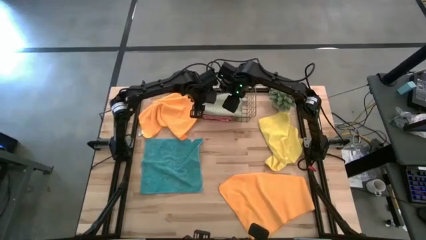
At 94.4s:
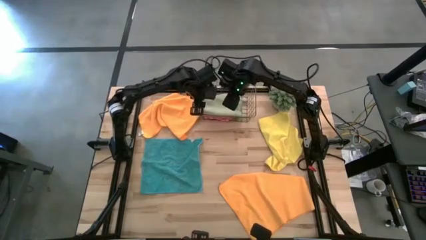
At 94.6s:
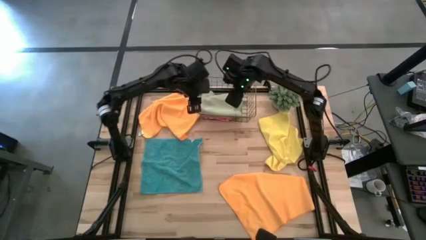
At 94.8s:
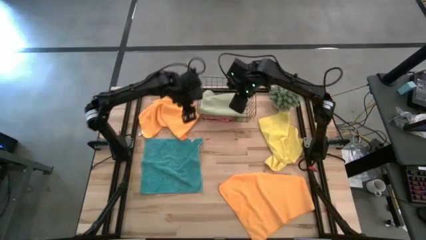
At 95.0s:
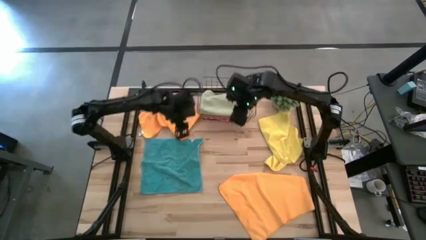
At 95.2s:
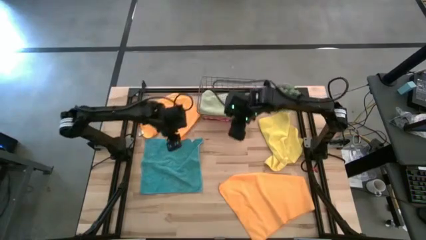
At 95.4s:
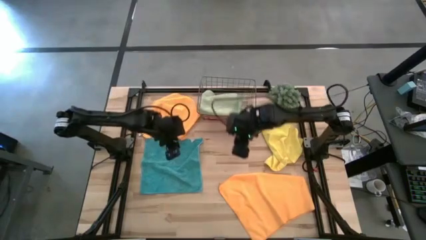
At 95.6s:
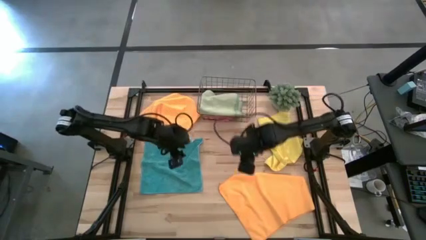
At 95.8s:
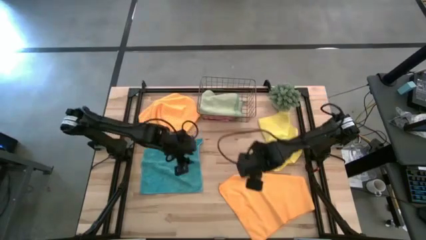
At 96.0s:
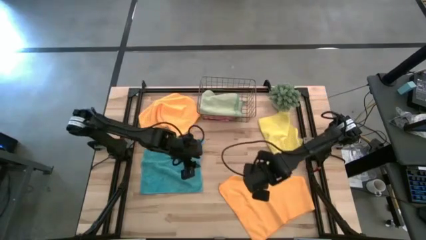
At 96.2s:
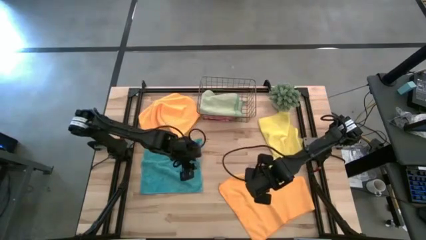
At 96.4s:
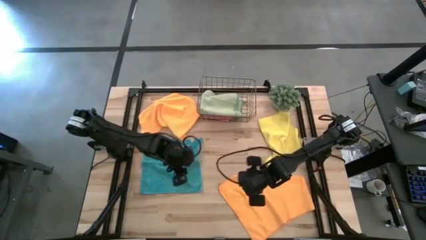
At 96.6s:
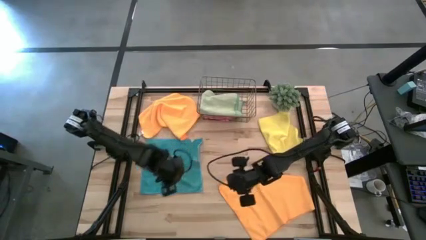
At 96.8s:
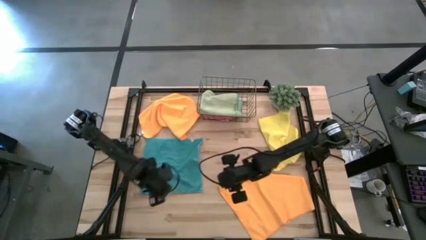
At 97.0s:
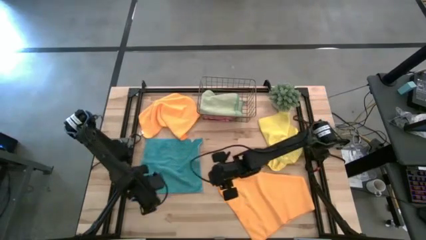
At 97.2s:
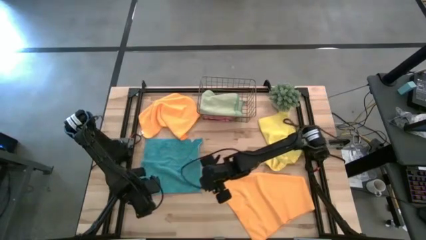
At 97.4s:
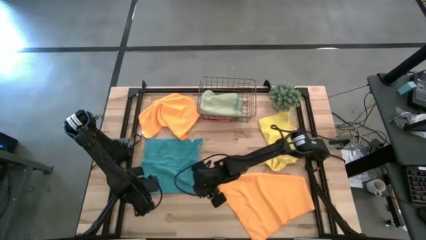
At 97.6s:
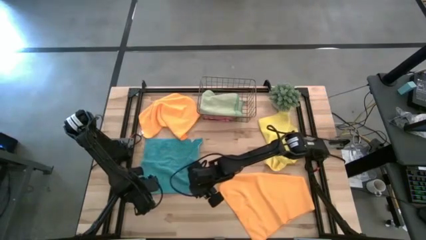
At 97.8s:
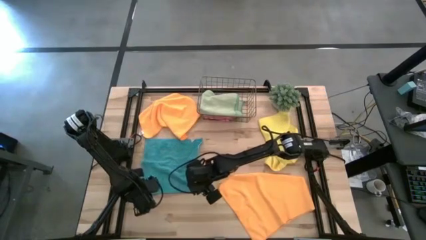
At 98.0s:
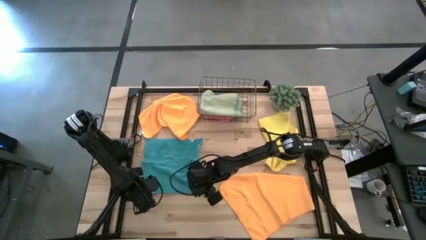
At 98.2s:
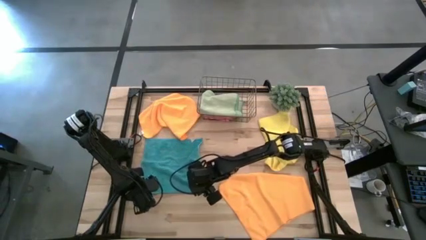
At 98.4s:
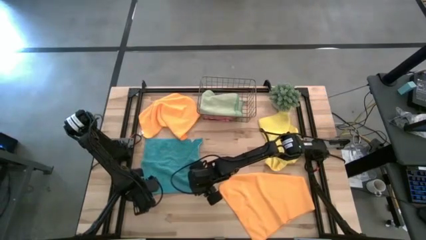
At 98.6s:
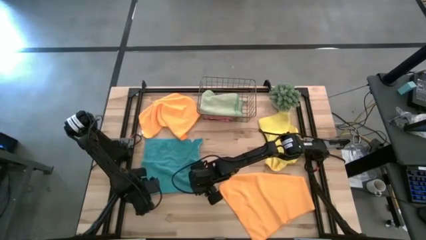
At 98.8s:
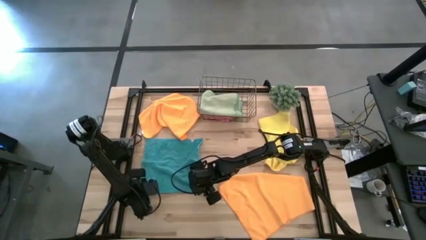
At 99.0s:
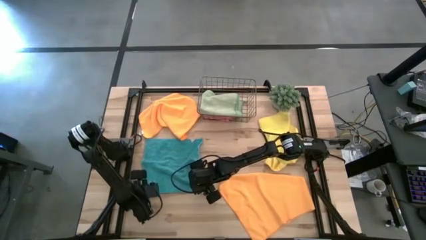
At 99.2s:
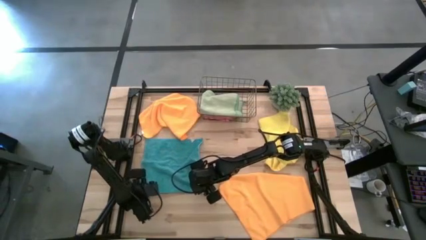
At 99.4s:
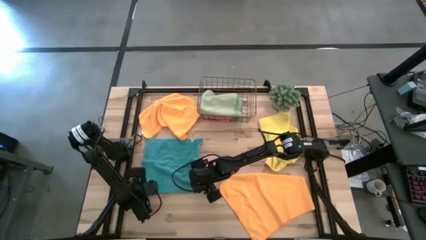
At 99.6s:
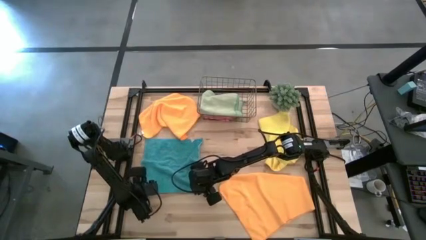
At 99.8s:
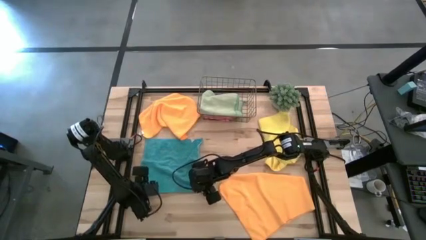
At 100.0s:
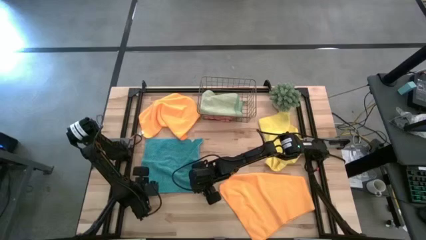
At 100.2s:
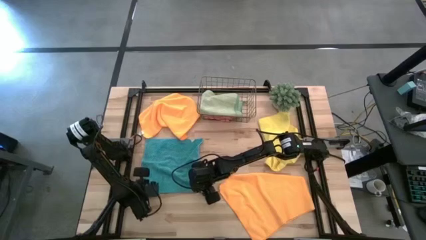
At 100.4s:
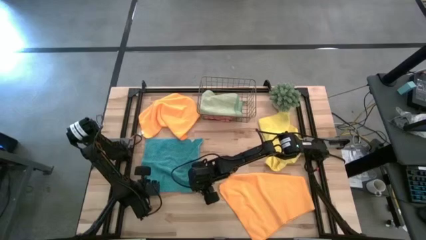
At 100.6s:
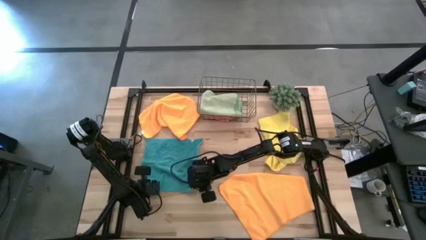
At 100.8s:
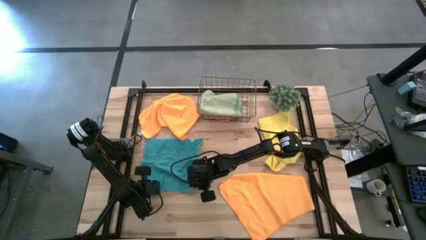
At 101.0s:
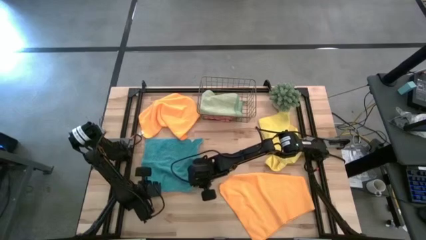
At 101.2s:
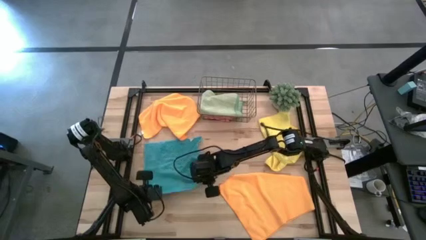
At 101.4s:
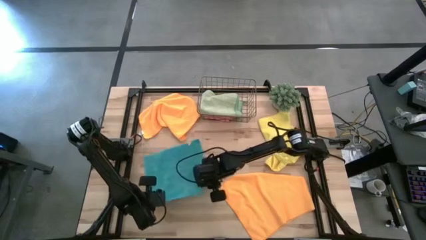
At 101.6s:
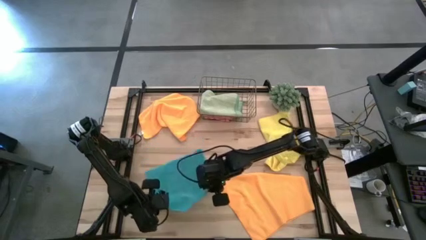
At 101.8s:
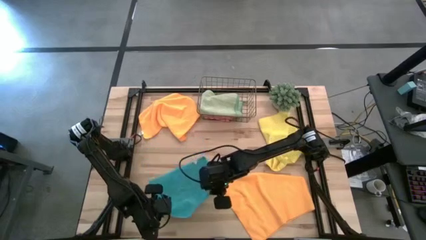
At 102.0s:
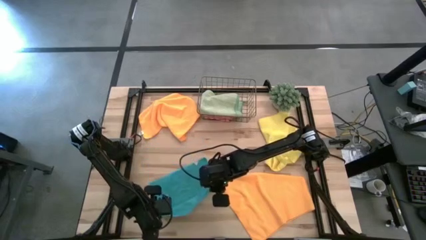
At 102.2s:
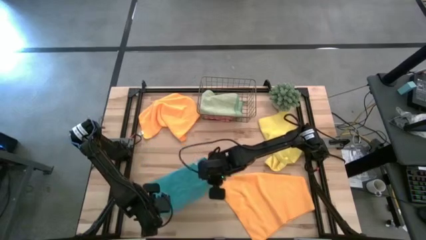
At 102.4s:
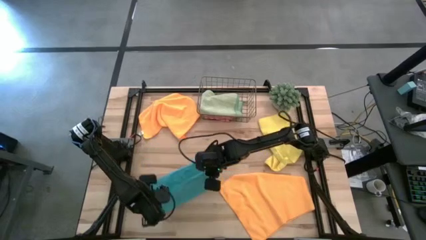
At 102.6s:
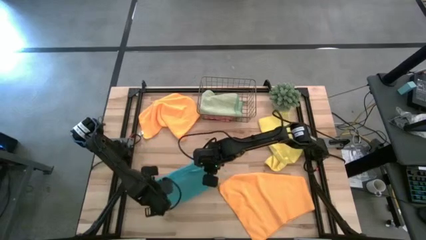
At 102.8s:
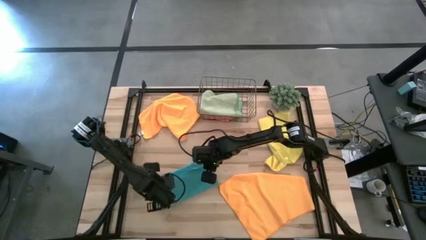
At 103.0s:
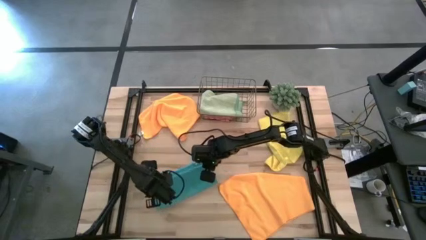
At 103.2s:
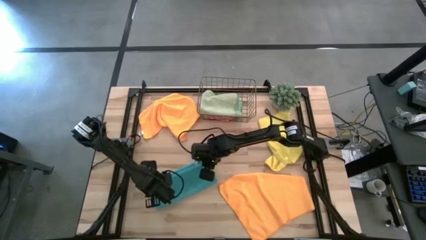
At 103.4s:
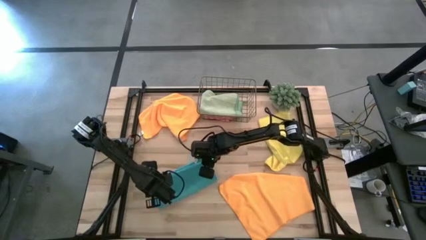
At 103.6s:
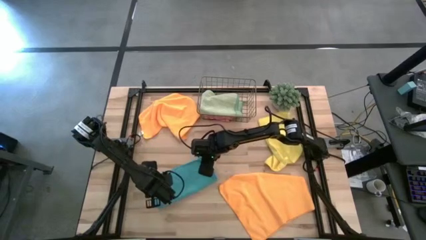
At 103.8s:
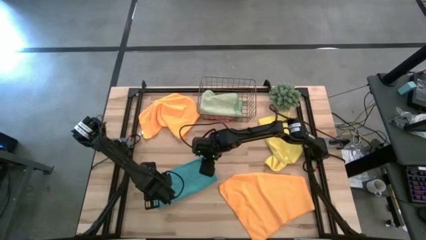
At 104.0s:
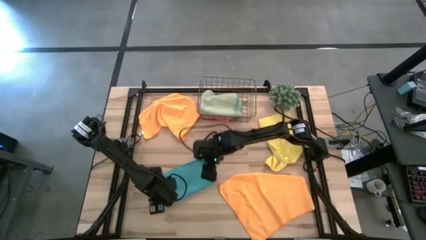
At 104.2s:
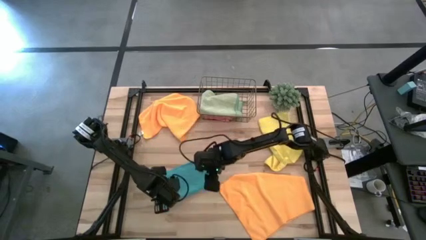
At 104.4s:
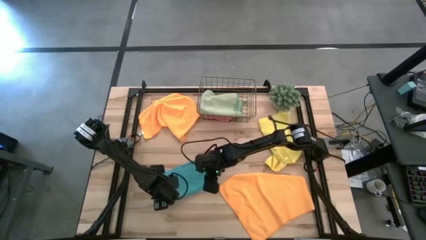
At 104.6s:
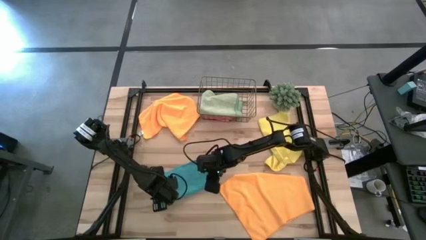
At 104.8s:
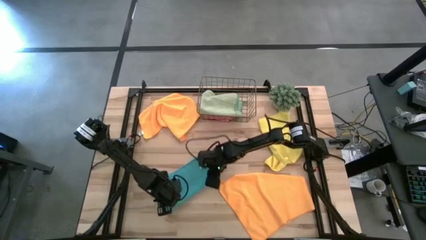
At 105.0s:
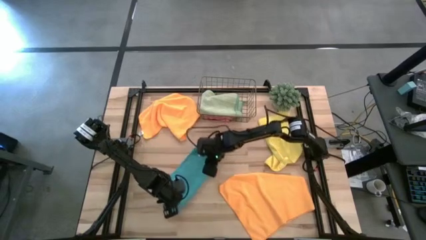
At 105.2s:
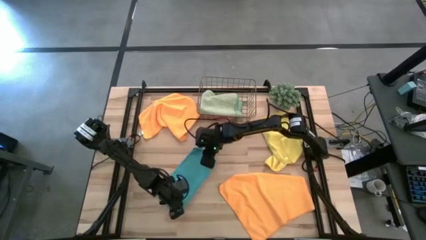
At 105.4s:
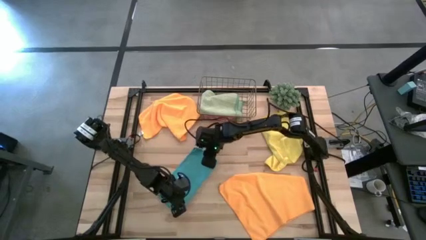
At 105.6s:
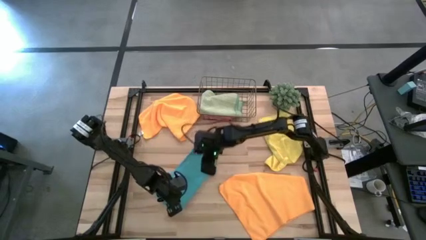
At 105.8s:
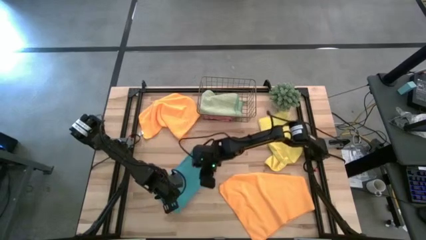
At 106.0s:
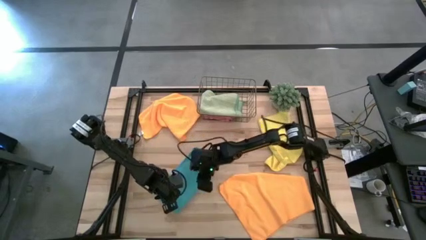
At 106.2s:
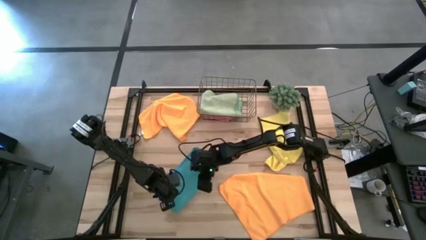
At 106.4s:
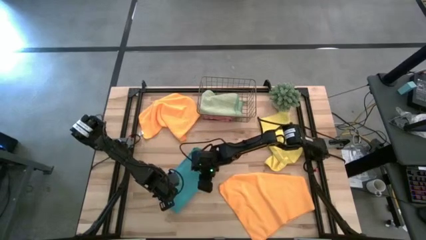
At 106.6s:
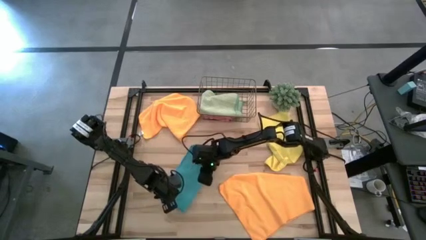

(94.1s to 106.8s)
Task: Fold microfiber towels
Fold the blue microfiber cloth

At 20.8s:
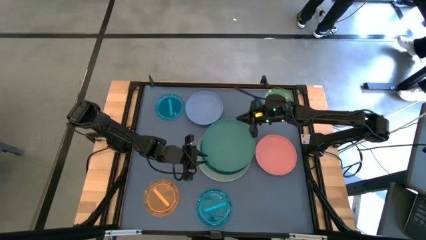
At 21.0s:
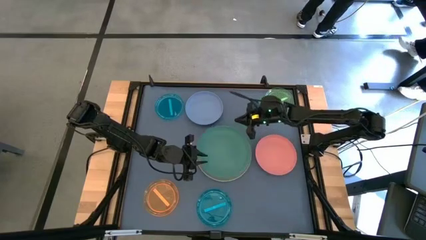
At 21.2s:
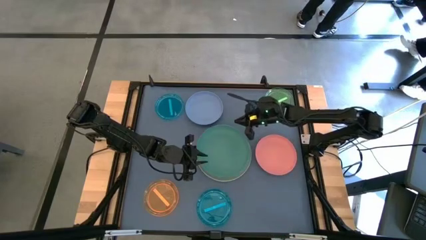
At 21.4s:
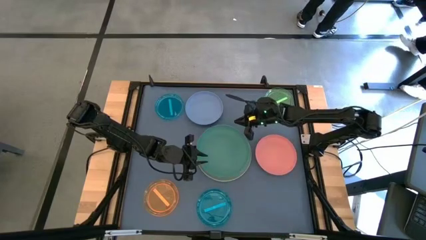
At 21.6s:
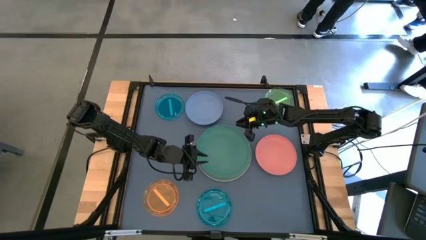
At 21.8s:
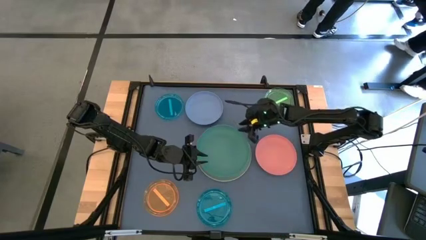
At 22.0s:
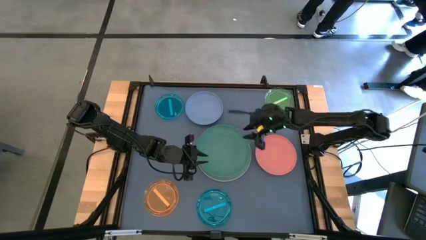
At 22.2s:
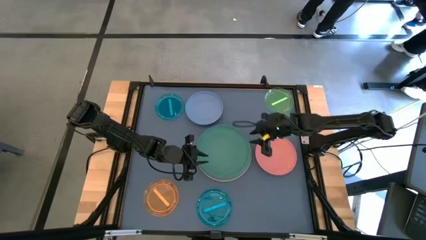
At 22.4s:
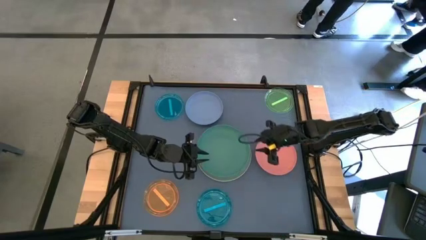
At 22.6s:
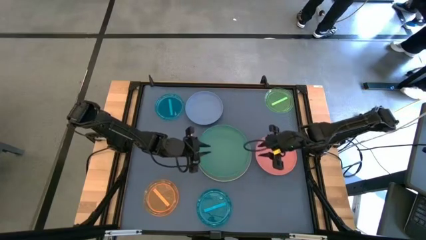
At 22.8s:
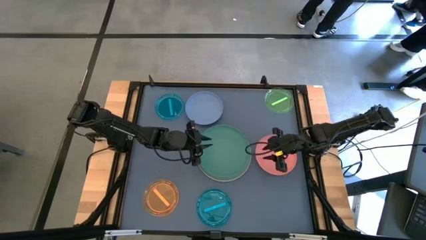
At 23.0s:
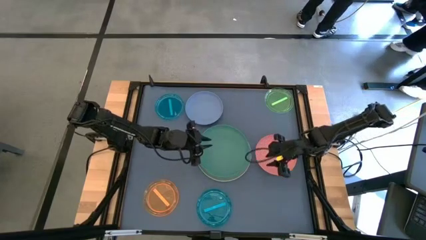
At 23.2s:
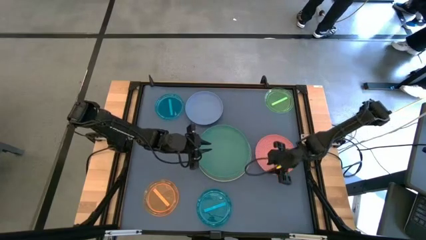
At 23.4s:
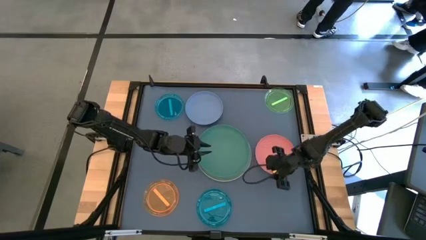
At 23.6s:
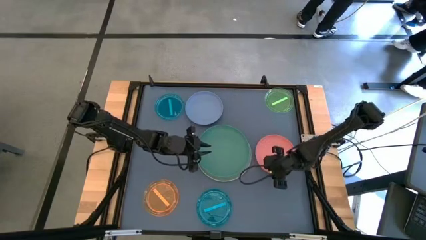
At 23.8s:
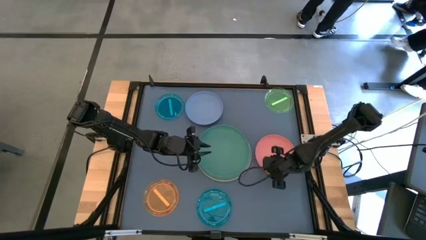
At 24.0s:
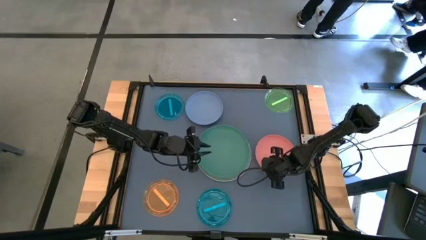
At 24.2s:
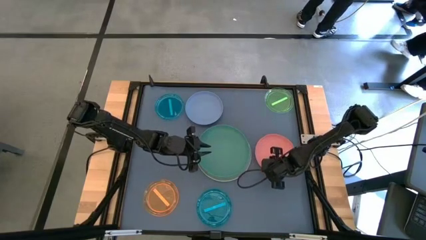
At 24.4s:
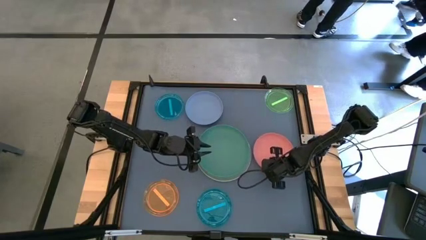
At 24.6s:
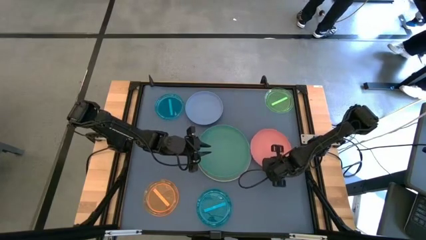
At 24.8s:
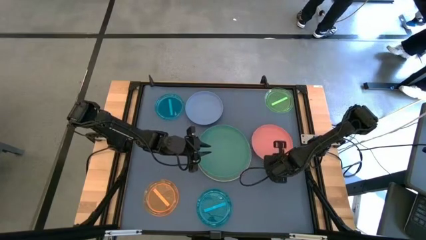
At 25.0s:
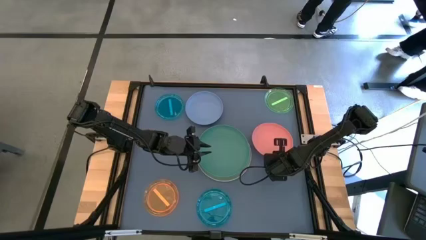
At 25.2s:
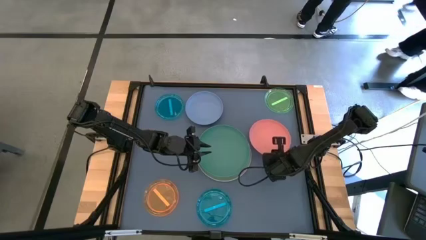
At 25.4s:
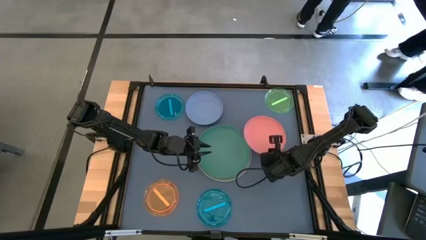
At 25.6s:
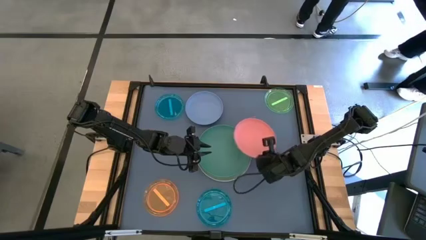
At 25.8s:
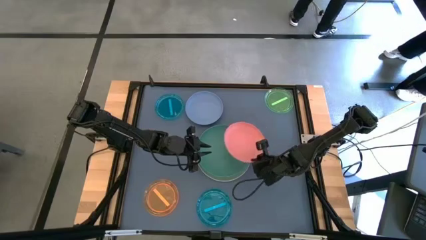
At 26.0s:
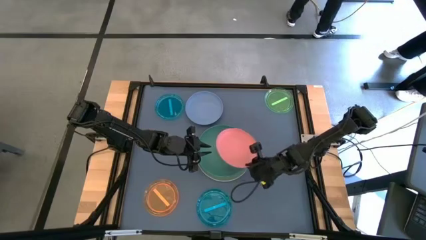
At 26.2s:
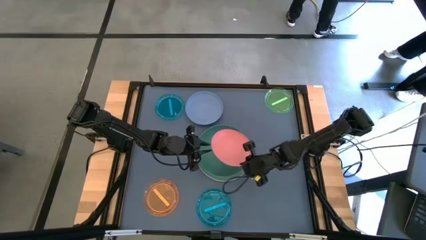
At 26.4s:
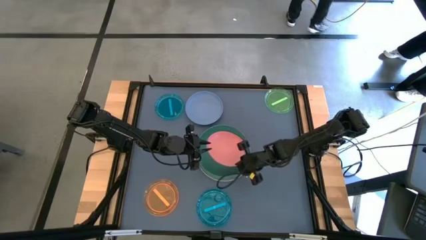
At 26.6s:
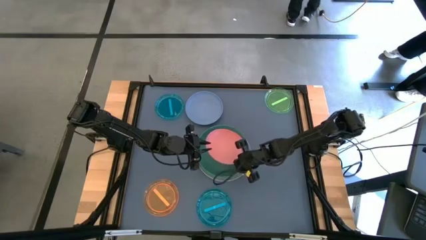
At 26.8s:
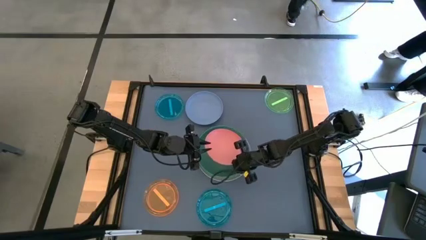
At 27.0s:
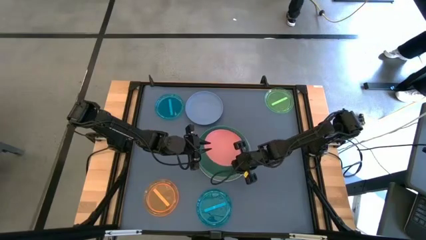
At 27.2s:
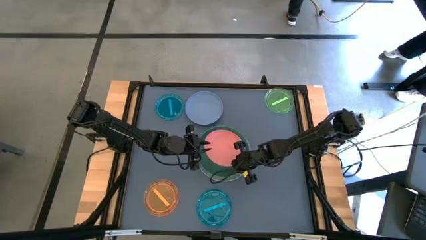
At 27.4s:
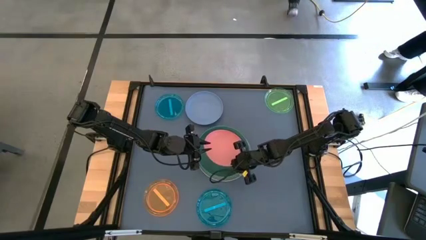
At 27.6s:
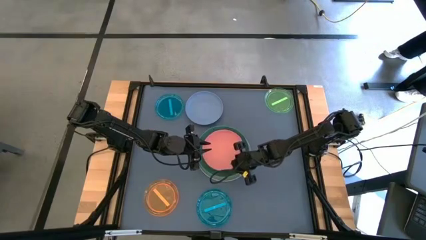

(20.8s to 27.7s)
Task: Stack plastic plates
Stack the orange plate on top of the green plate
